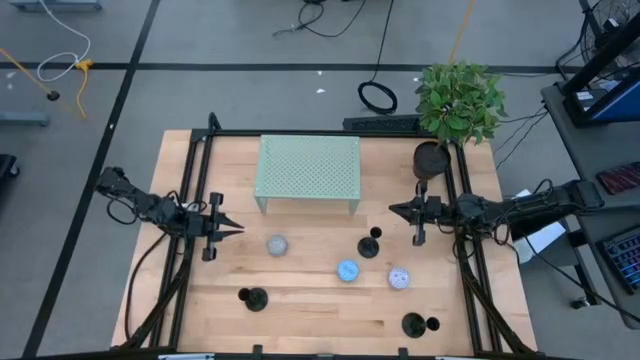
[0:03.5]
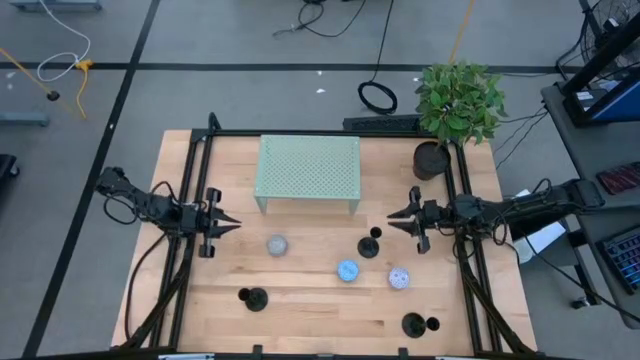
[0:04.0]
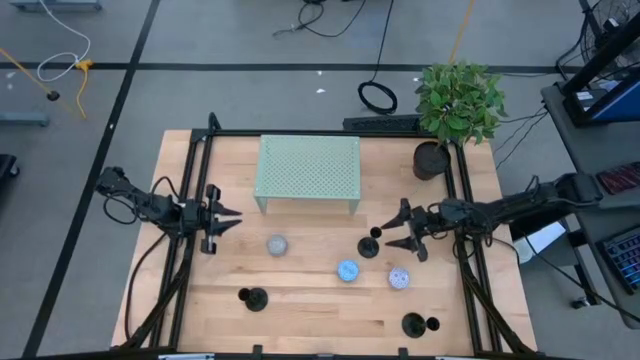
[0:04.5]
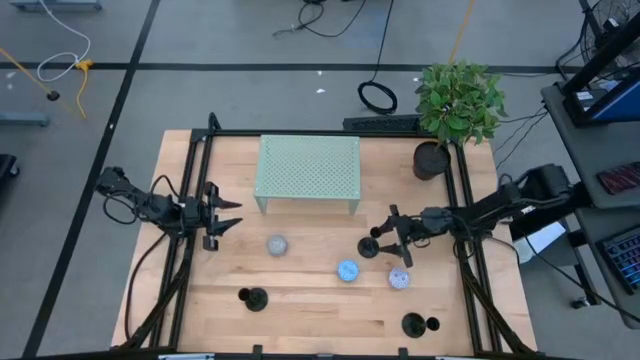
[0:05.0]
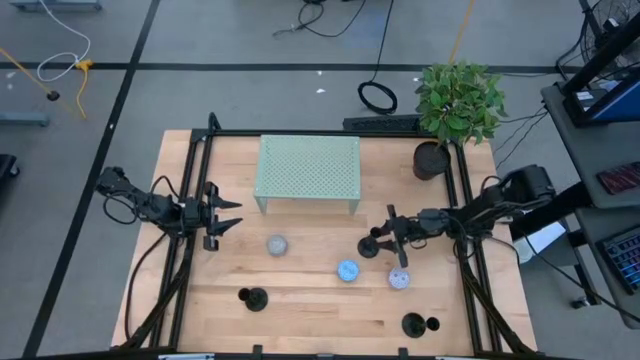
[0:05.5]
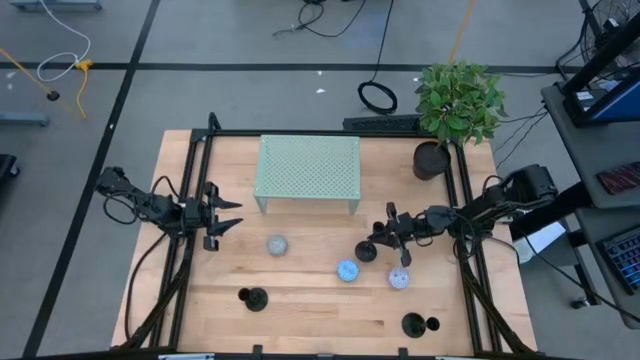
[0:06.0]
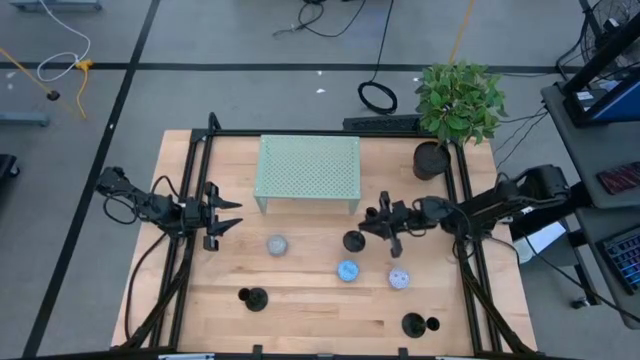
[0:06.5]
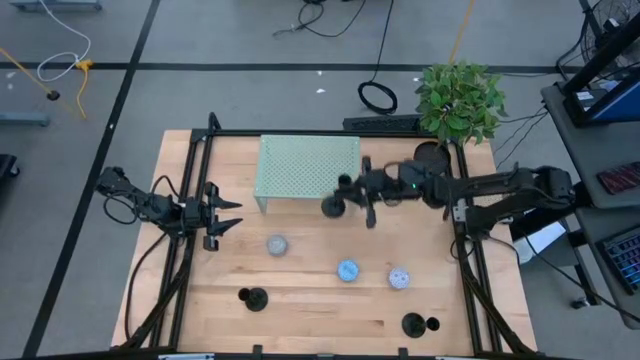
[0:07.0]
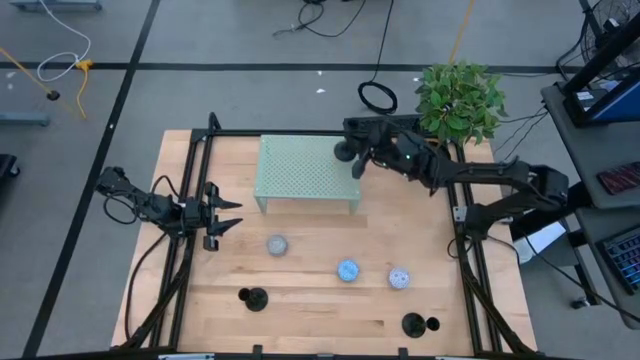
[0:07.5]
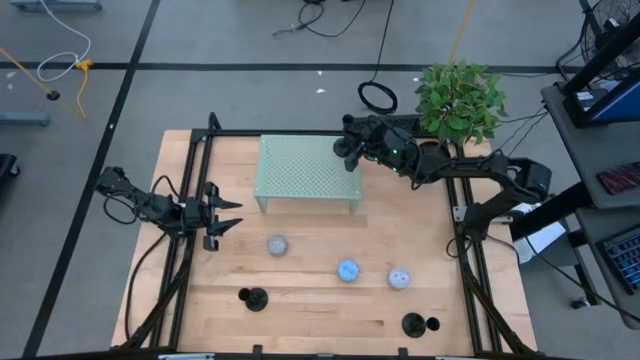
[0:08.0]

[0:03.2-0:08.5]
Task: Pick & Place candle stick holders
Put the top candle holder on the shelf

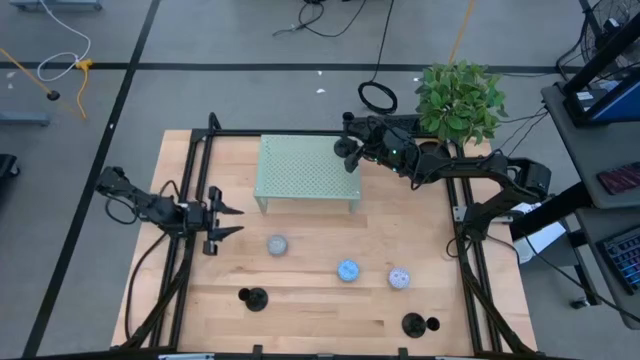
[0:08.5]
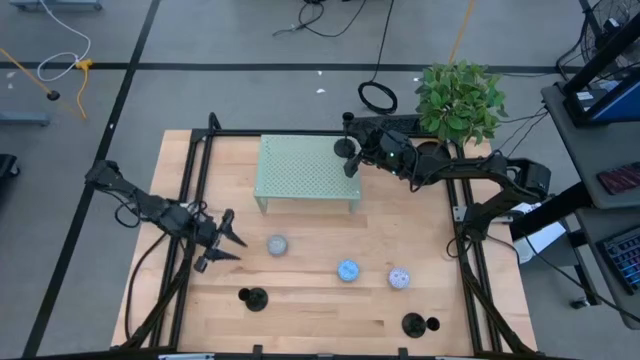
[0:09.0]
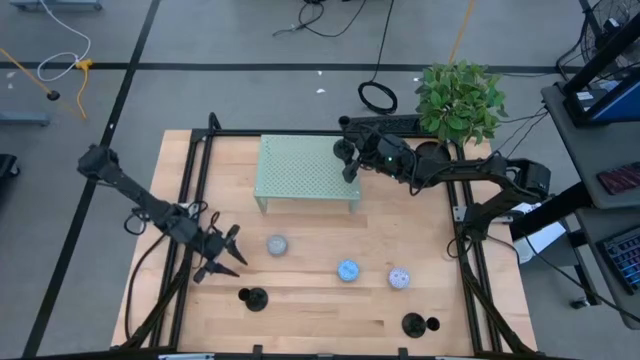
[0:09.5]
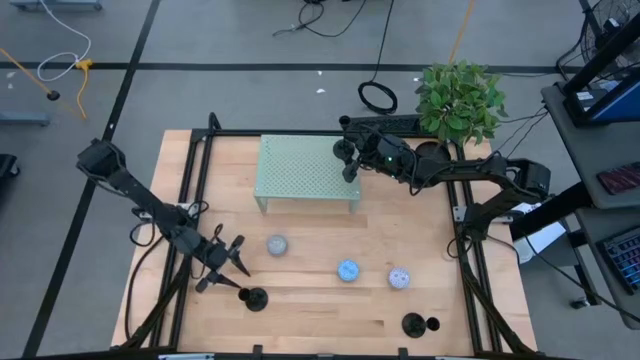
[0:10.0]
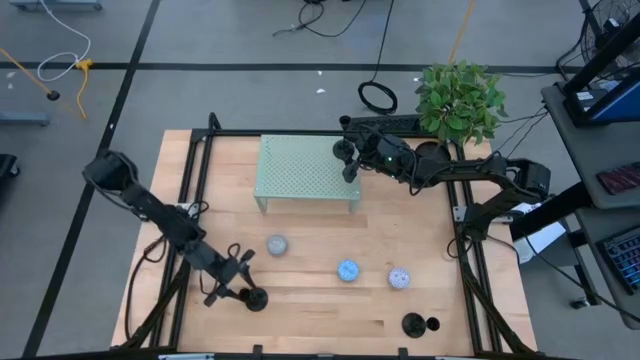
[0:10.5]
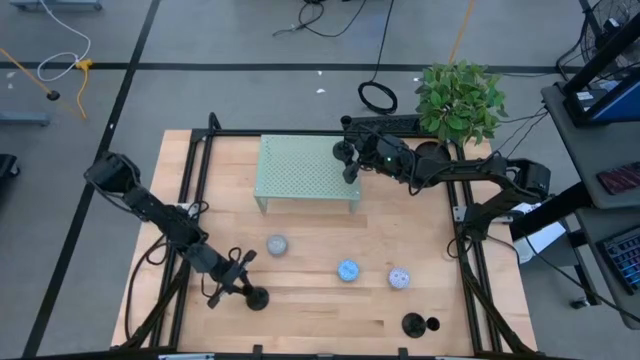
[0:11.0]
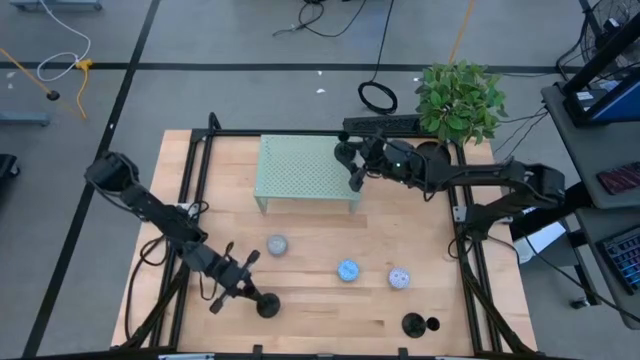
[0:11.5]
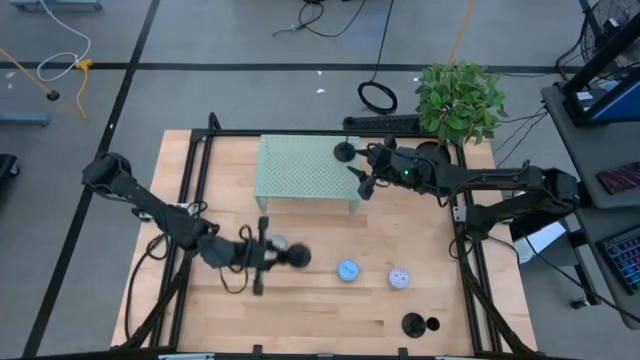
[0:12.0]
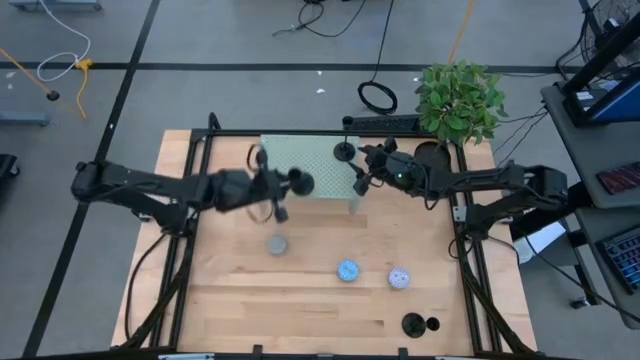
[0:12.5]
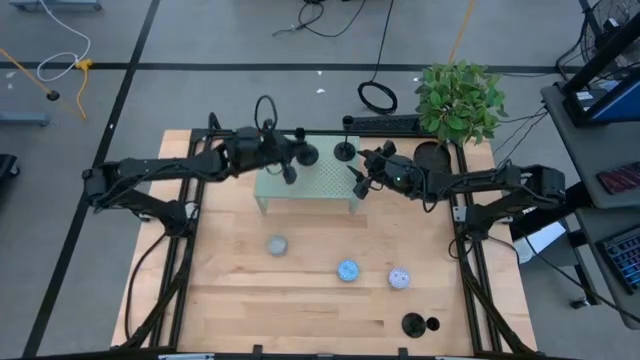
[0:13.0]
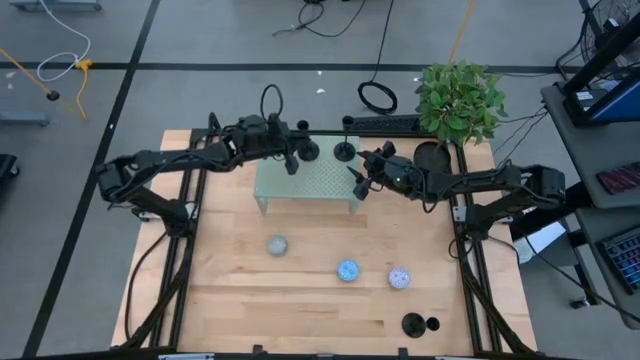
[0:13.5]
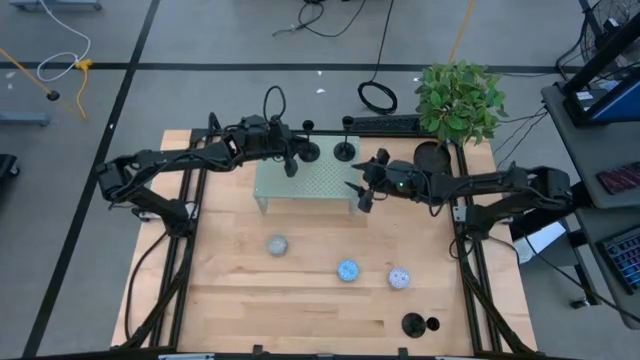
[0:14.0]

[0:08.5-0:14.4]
Put the left candle holder on the shelf aligned with the other candle holder

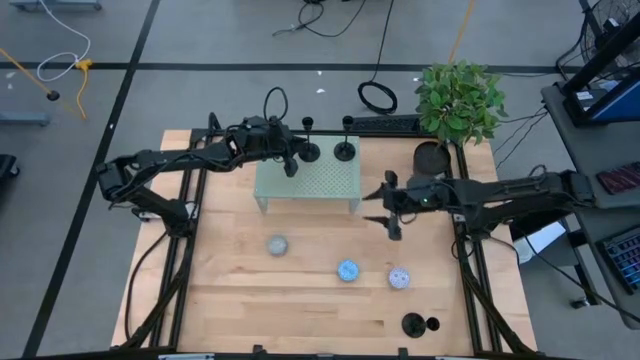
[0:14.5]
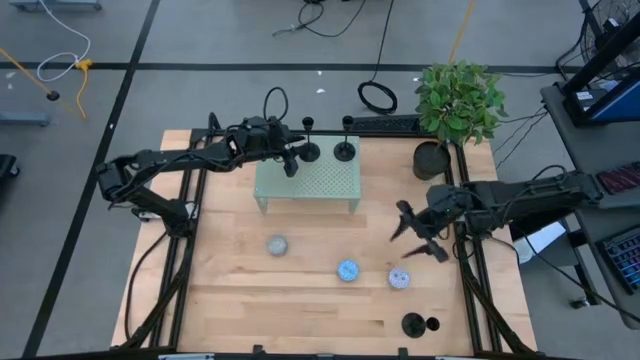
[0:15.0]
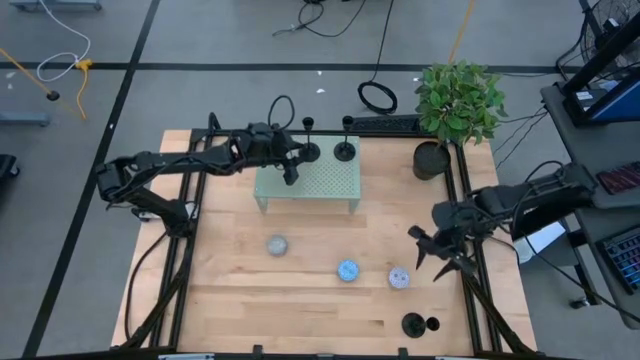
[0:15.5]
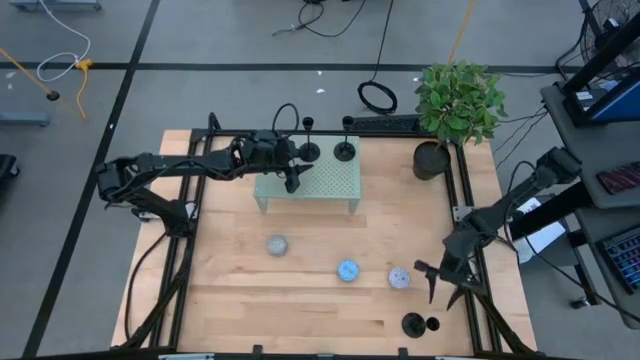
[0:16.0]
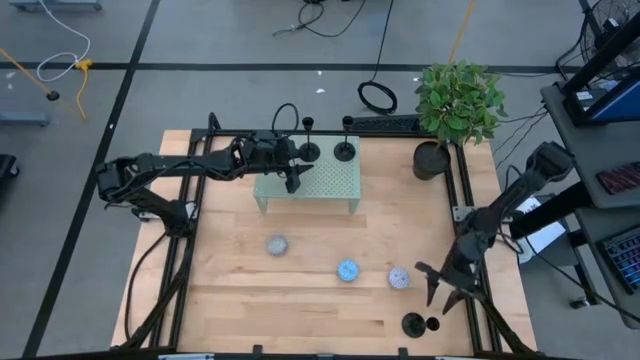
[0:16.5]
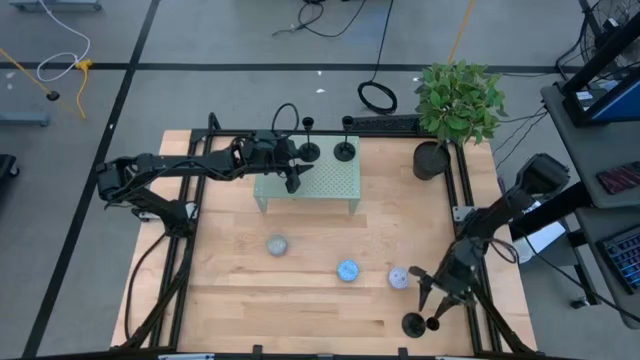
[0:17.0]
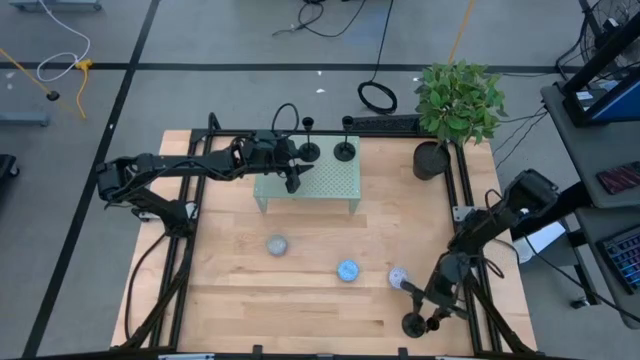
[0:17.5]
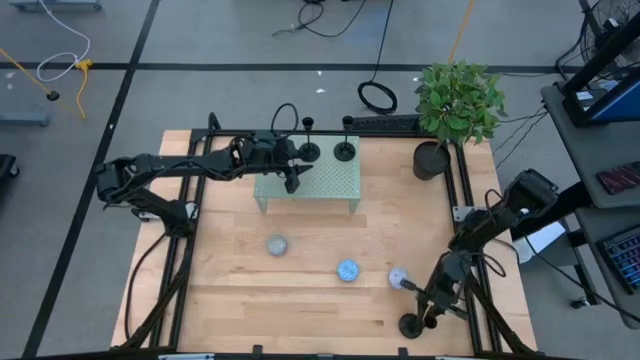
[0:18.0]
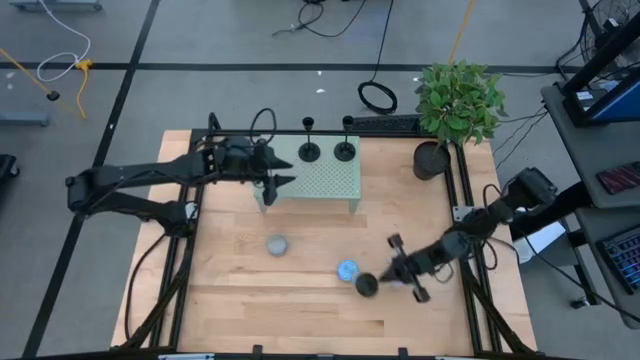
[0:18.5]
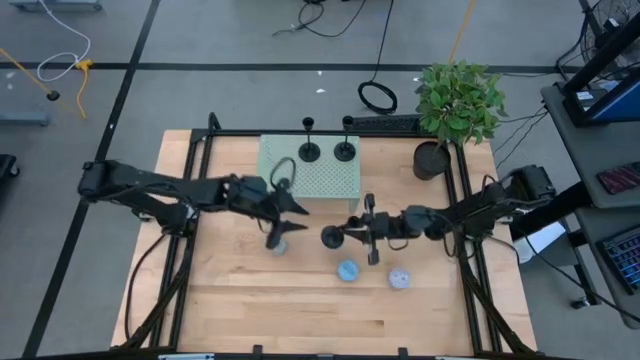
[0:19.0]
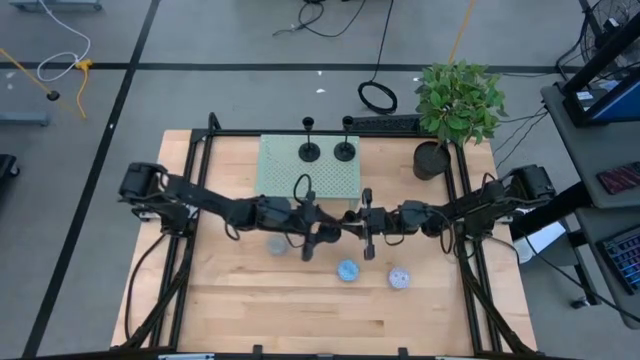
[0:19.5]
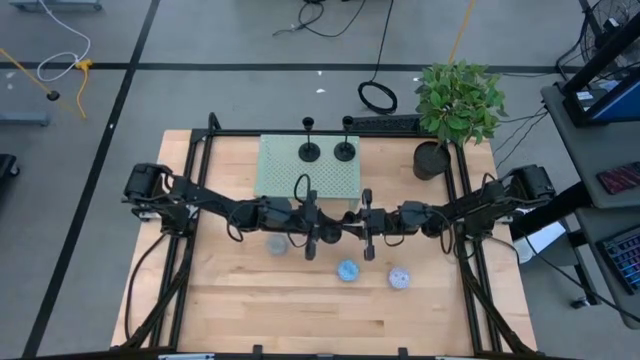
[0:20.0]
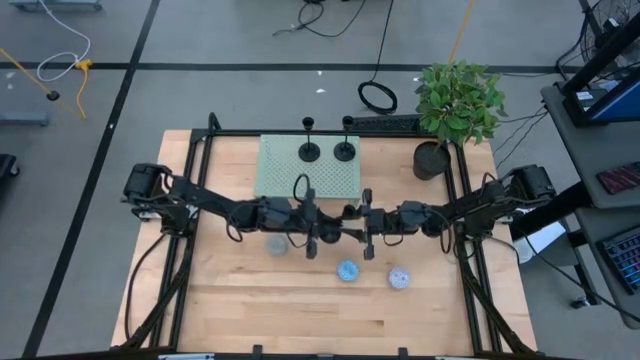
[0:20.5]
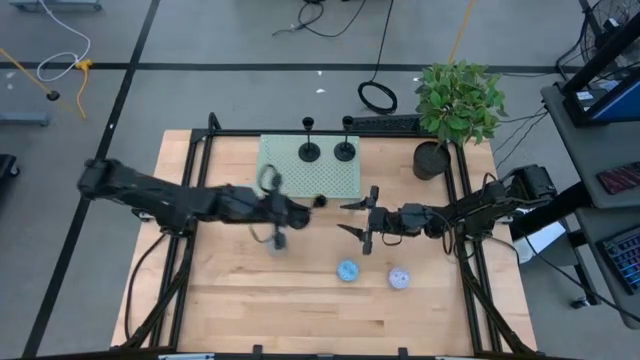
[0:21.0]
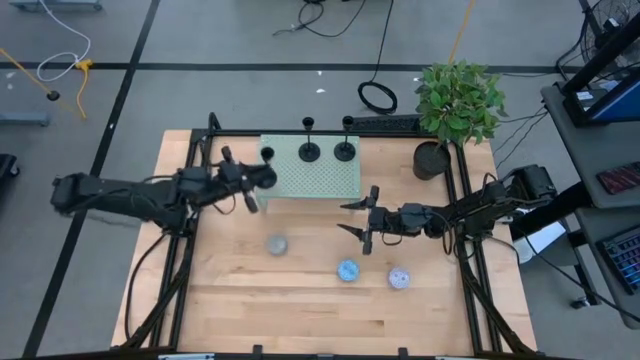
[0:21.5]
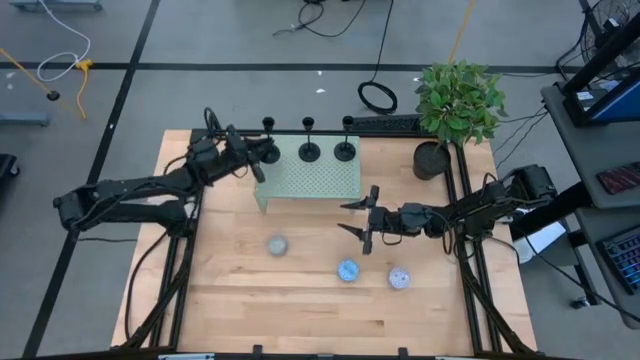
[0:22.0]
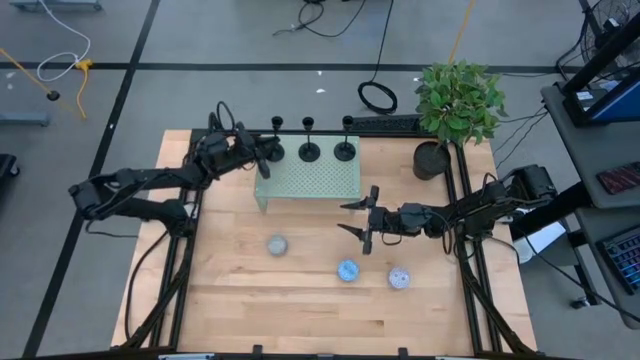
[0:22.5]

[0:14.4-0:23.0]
Put the candle holder on the shelf aligned with the other candle holder

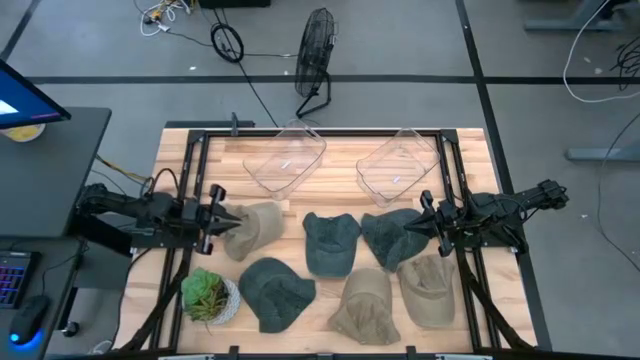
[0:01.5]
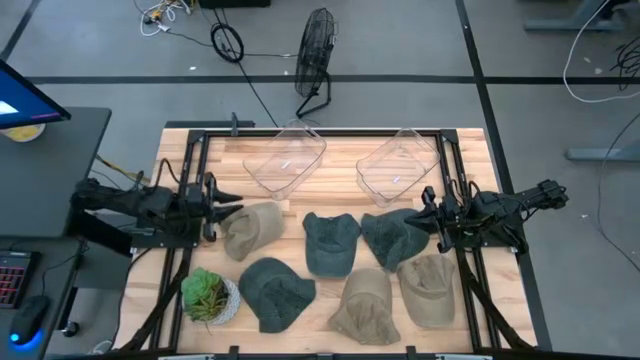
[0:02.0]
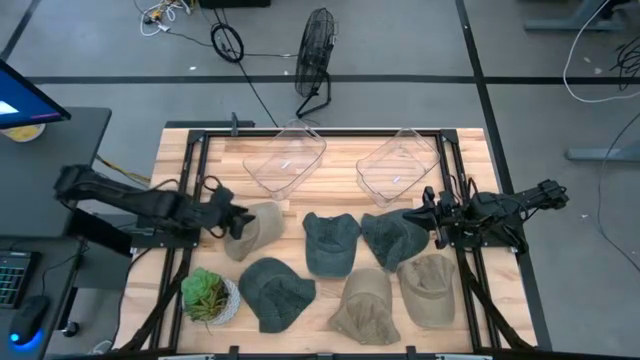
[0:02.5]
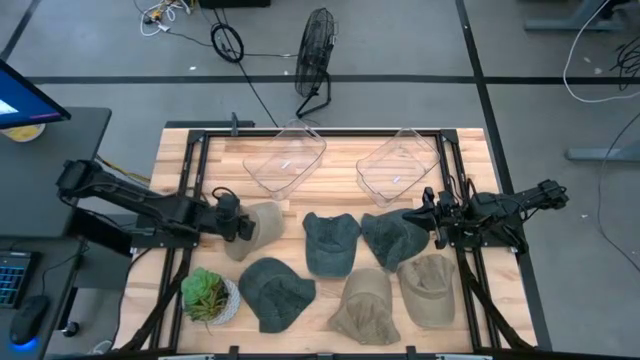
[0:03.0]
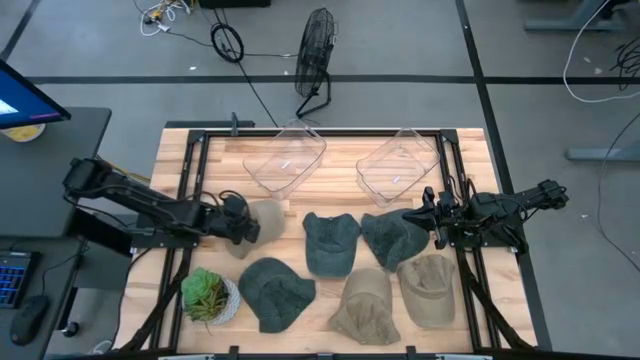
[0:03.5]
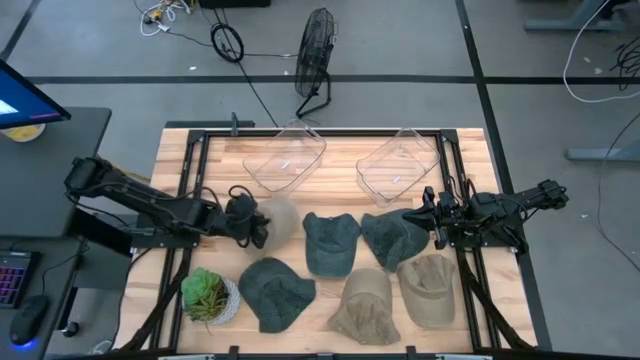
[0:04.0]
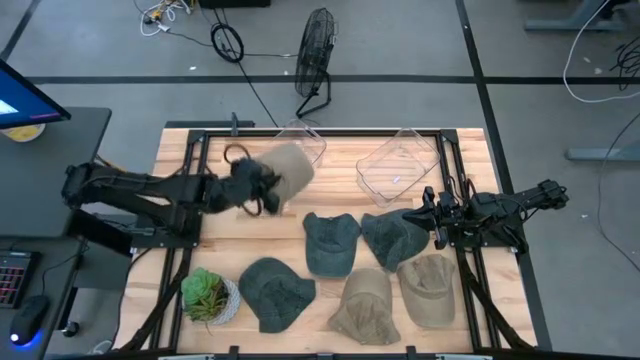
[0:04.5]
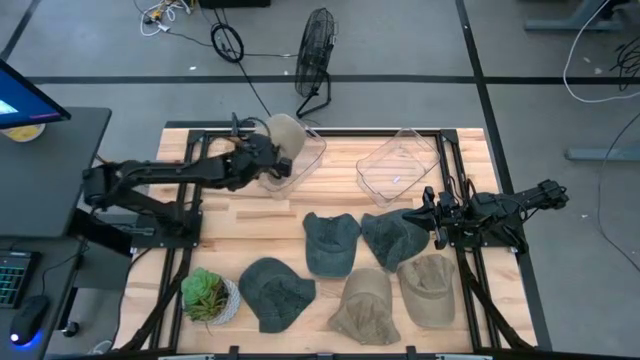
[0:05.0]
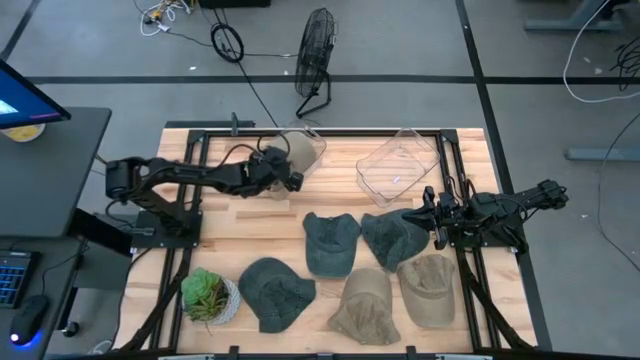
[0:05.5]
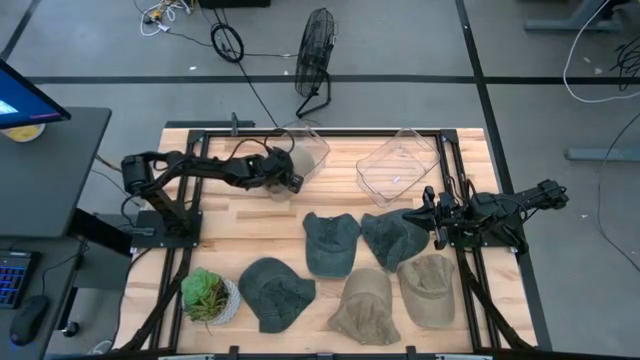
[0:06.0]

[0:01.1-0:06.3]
Task: Pick & Place hat
Put the top brown cap into the left transparent bin
